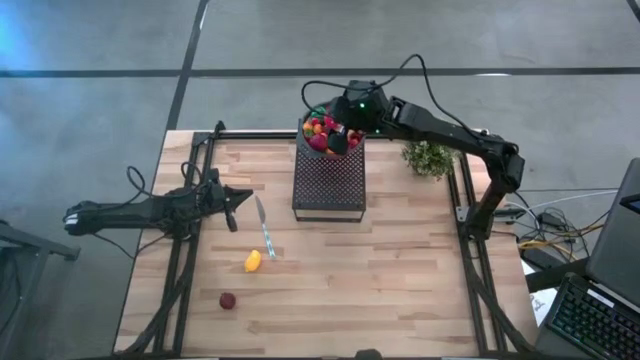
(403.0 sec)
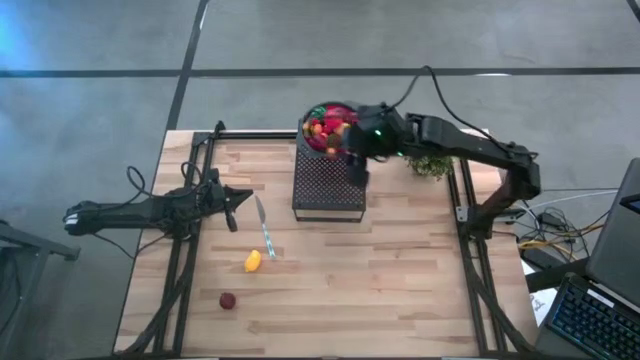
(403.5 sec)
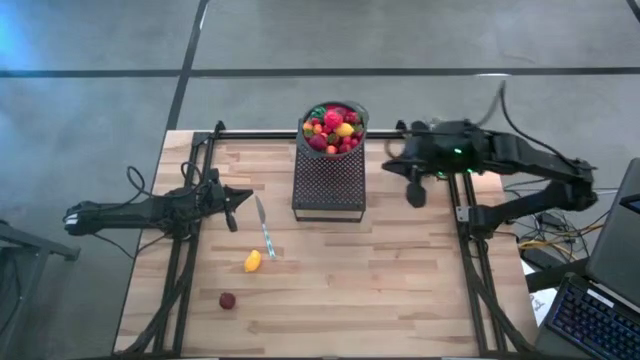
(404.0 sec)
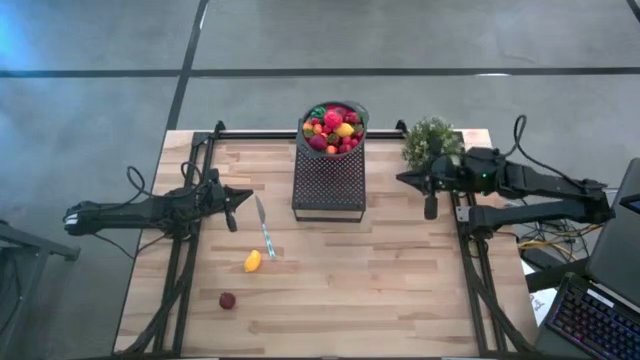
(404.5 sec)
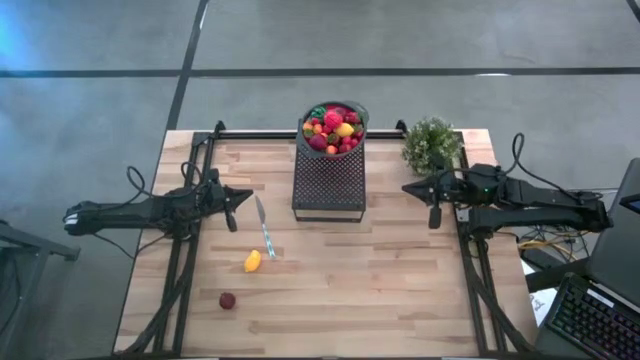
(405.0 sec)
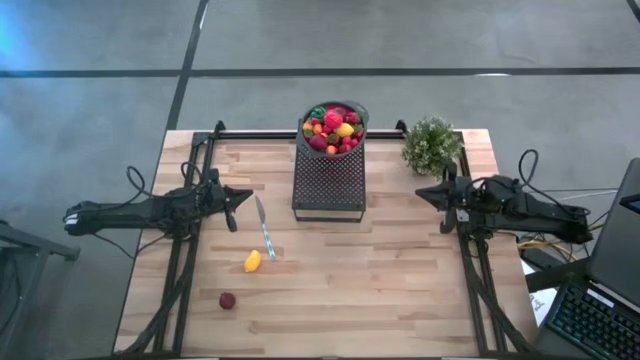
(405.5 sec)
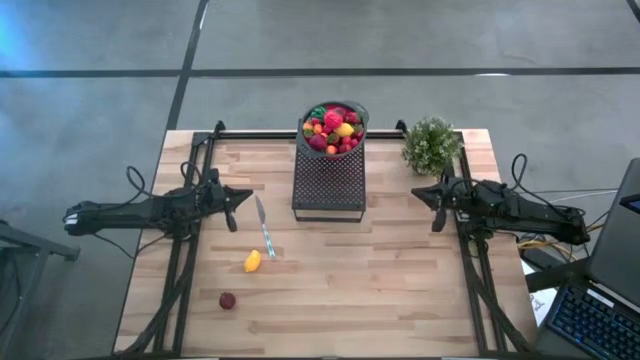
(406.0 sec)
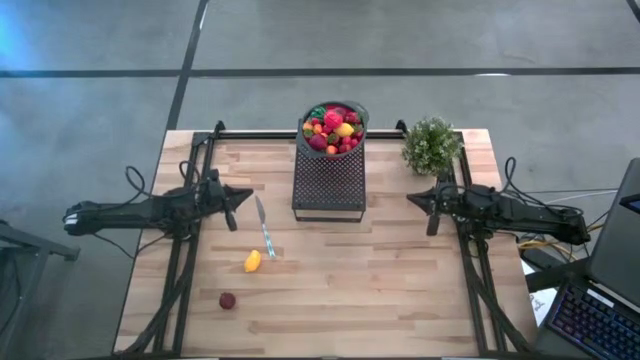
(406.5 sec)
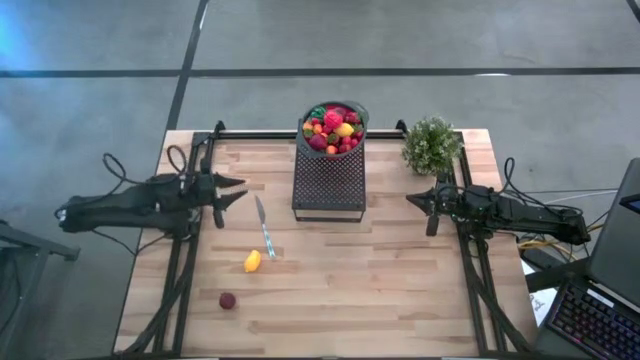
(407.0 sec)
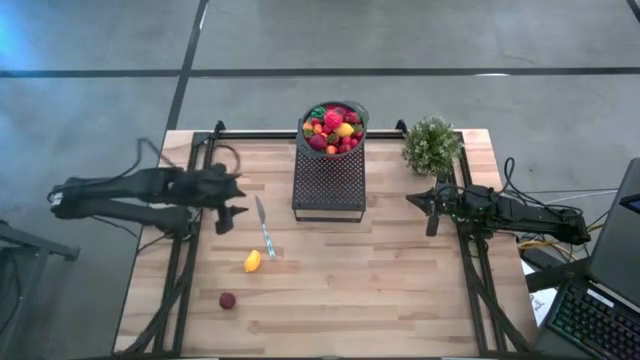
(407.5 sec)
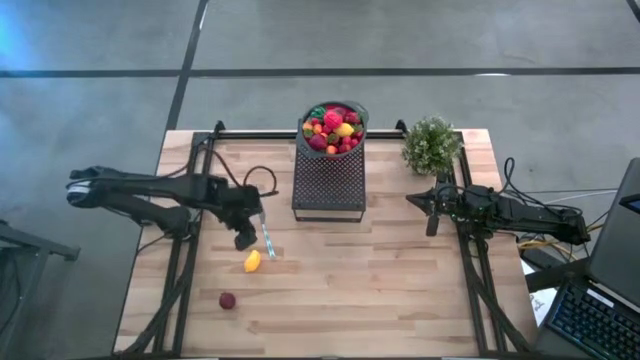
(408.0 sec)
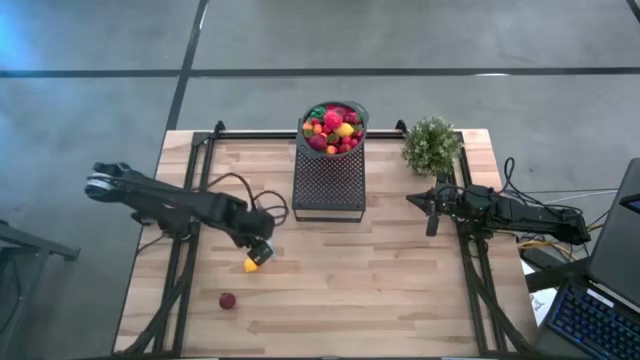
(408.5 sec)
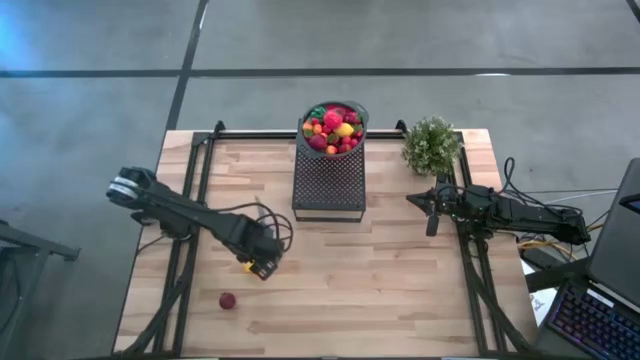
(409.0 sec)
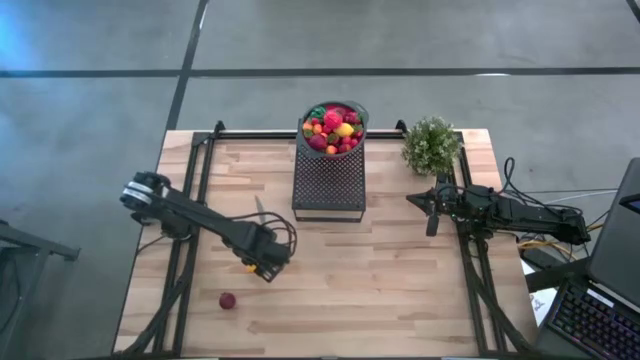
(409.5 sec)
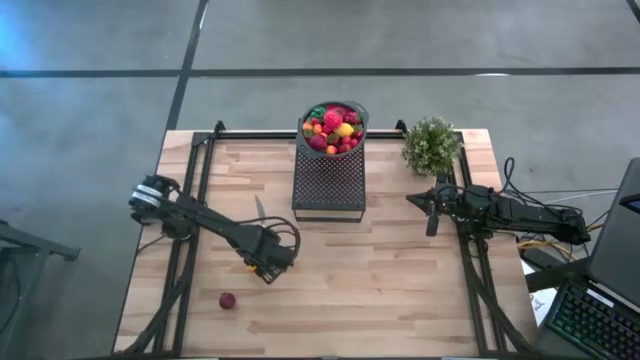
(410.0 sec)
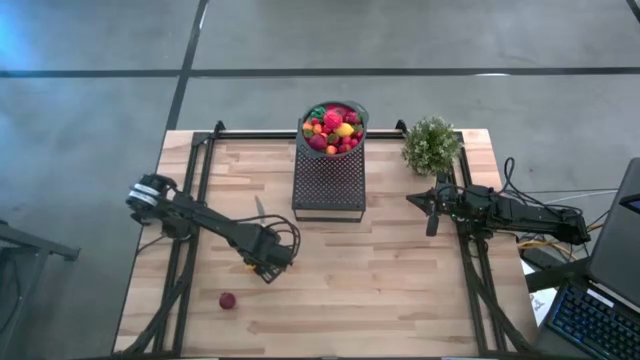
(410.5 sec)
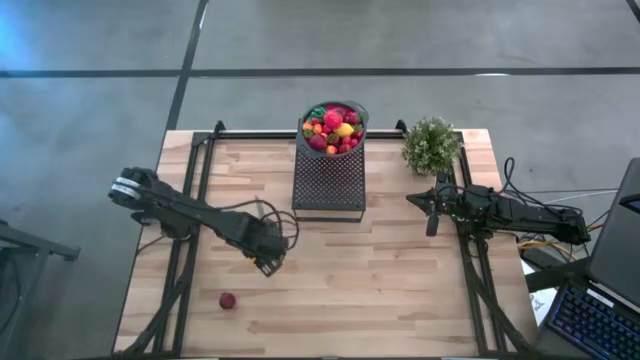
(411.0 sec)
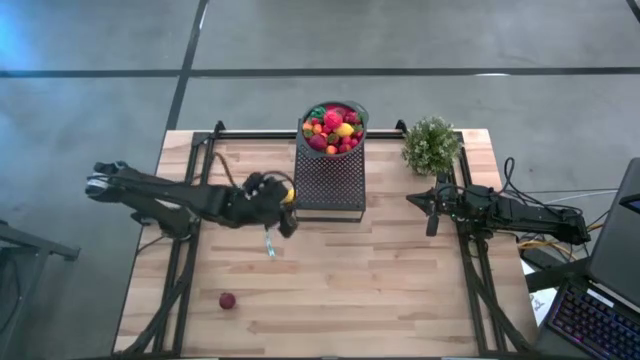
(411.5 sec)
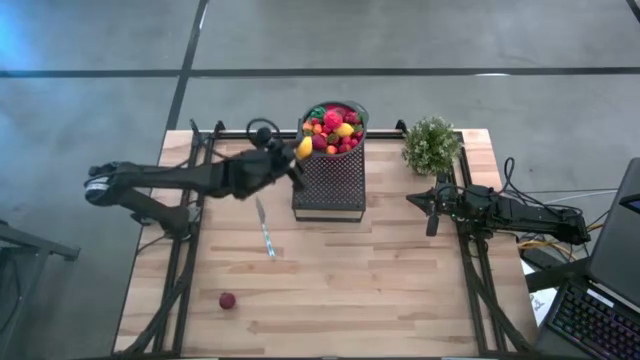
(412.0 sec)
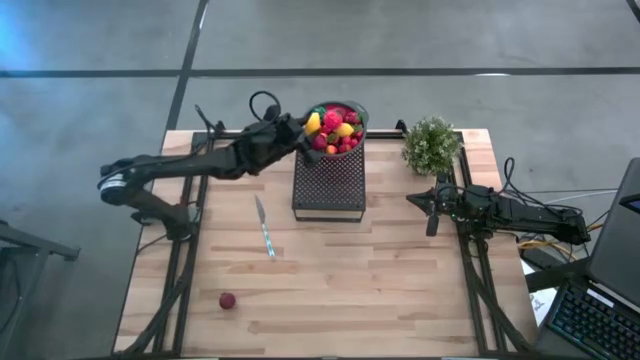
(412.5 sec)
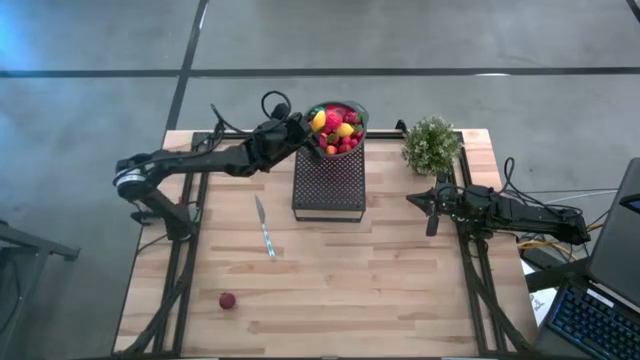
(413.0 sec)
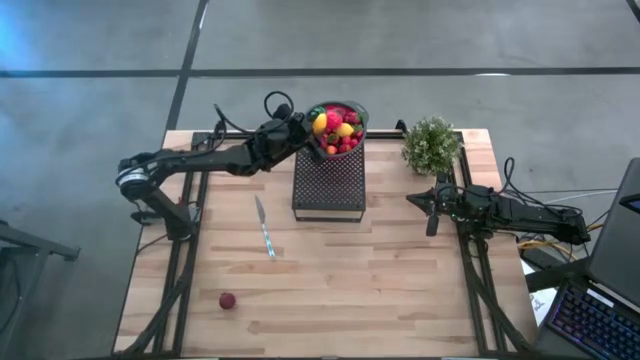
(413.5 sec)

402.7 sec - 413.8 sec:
Task: Pick & Place Fruit
Put the yellow mango into the strainer bowl on the shelf

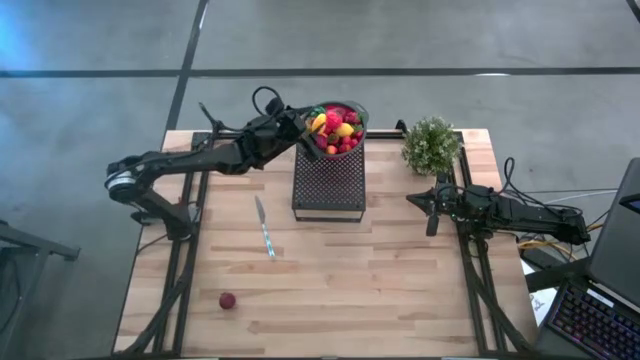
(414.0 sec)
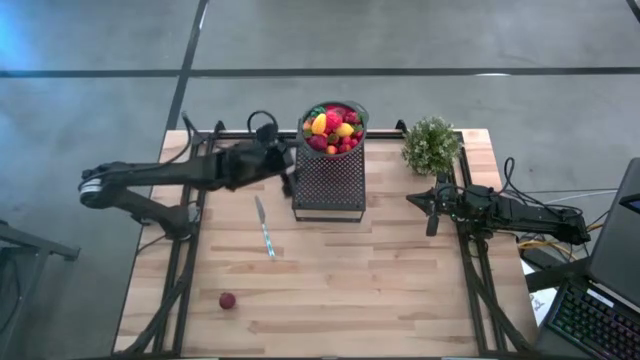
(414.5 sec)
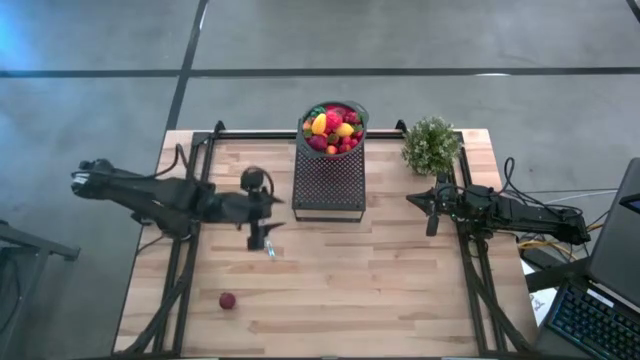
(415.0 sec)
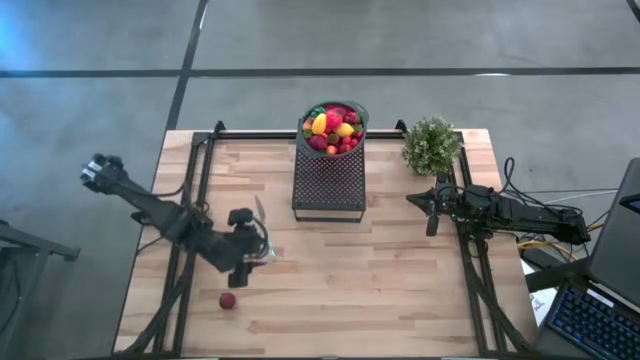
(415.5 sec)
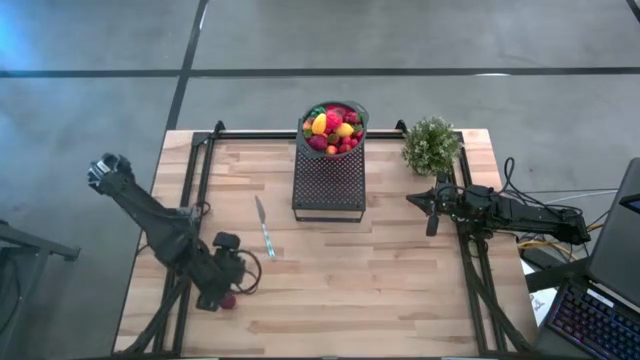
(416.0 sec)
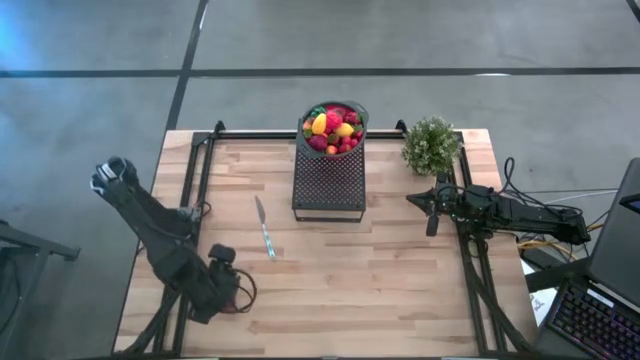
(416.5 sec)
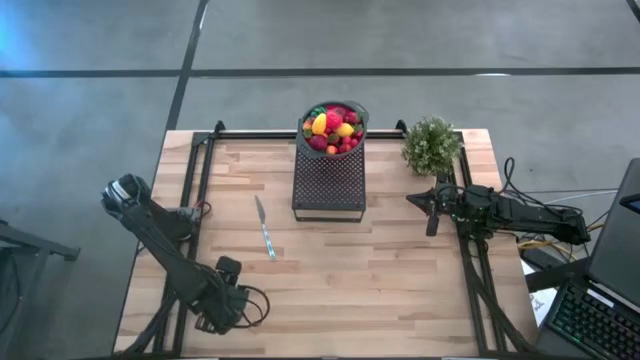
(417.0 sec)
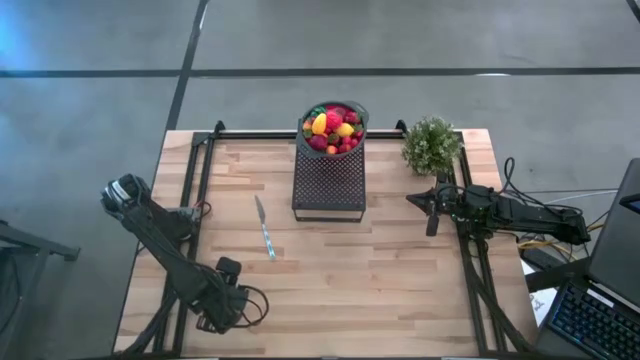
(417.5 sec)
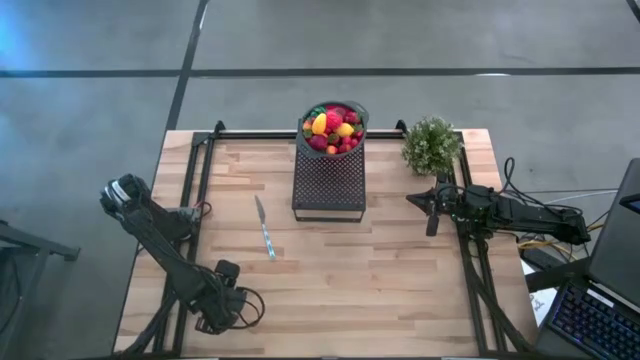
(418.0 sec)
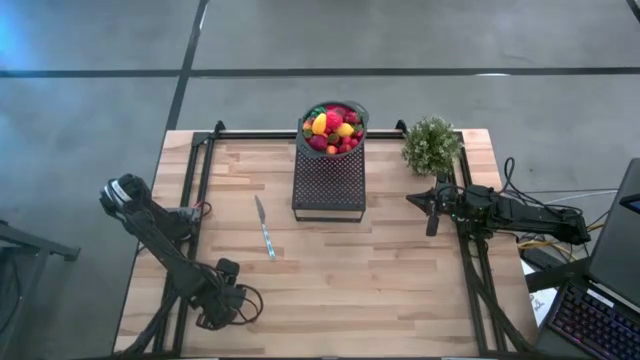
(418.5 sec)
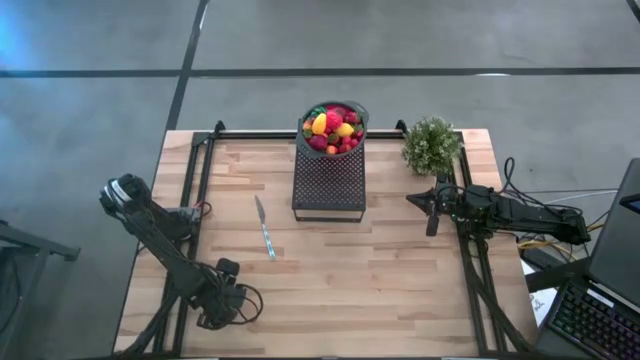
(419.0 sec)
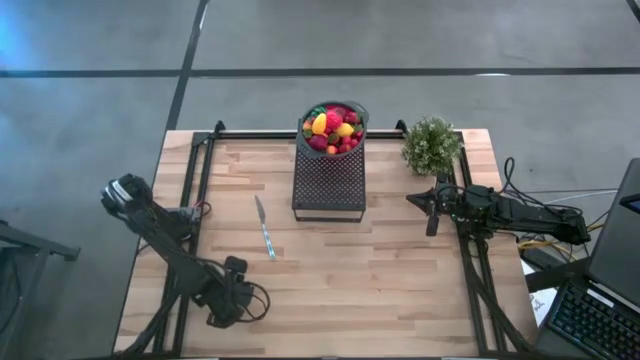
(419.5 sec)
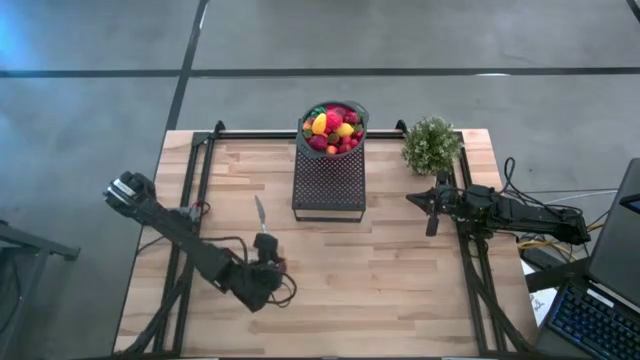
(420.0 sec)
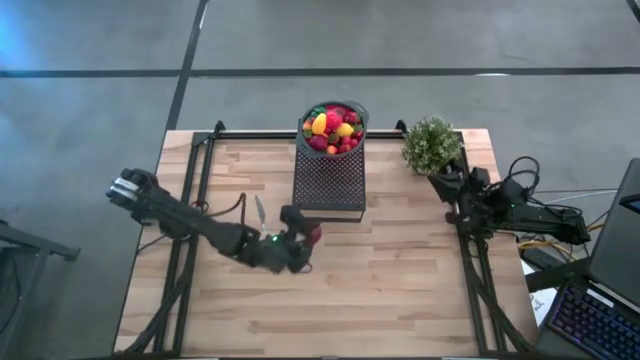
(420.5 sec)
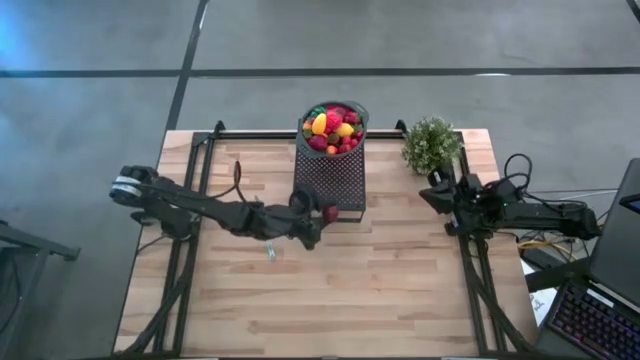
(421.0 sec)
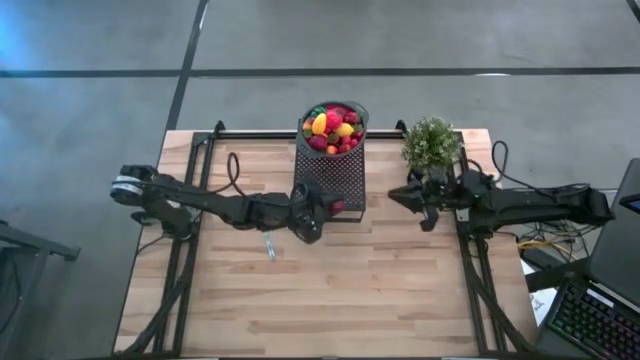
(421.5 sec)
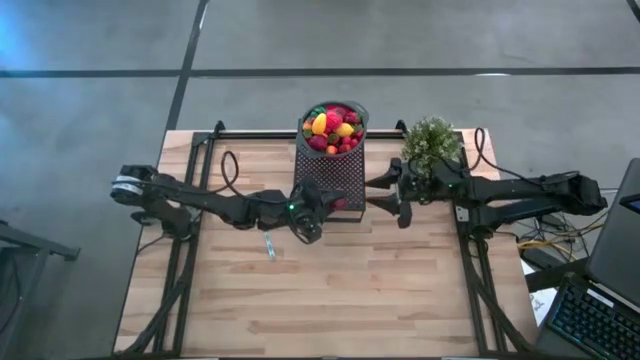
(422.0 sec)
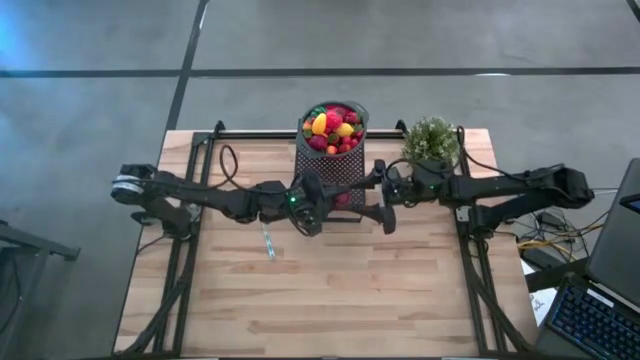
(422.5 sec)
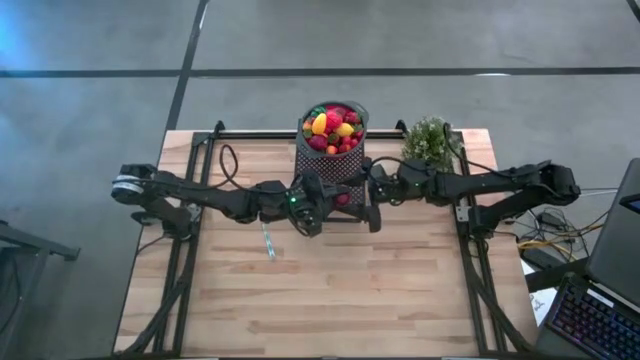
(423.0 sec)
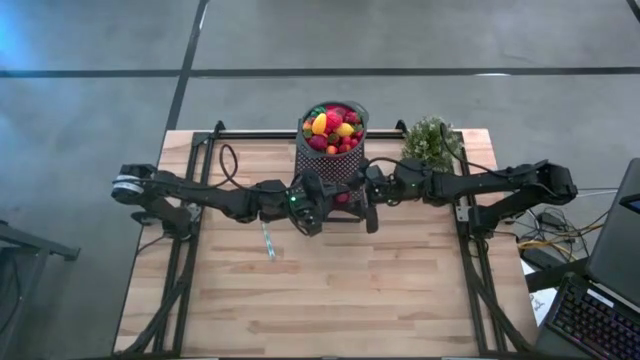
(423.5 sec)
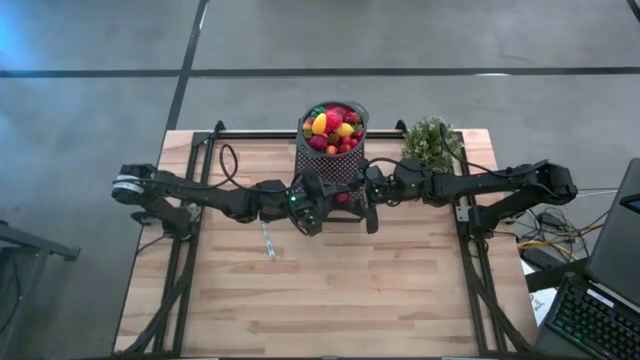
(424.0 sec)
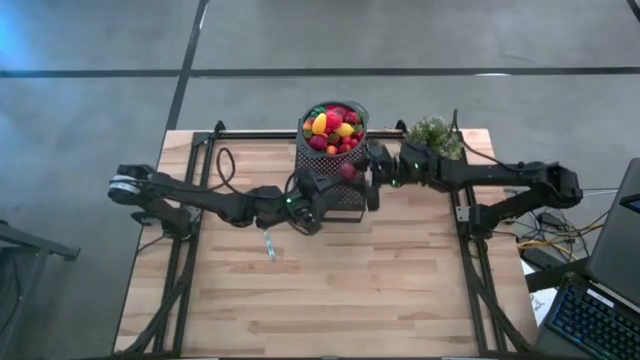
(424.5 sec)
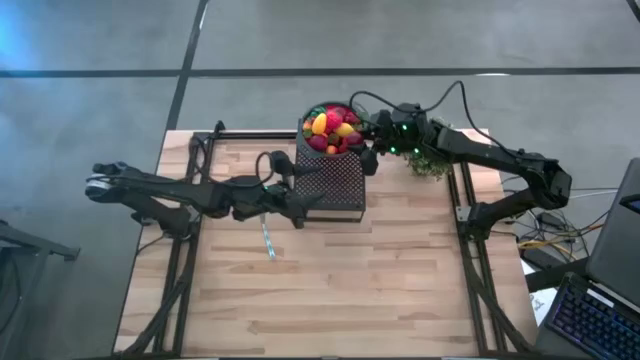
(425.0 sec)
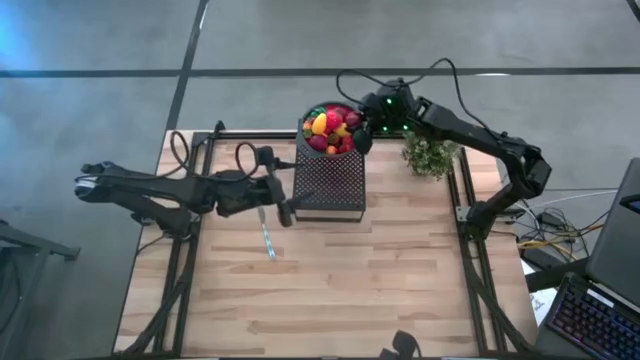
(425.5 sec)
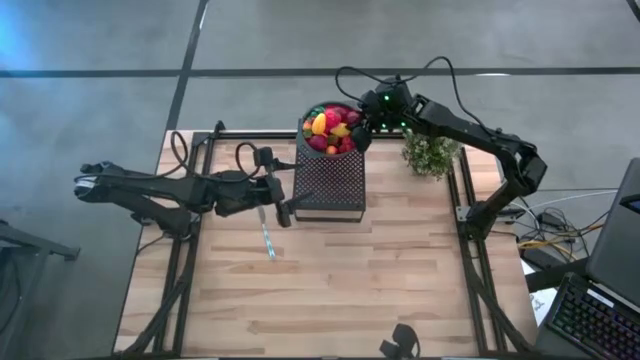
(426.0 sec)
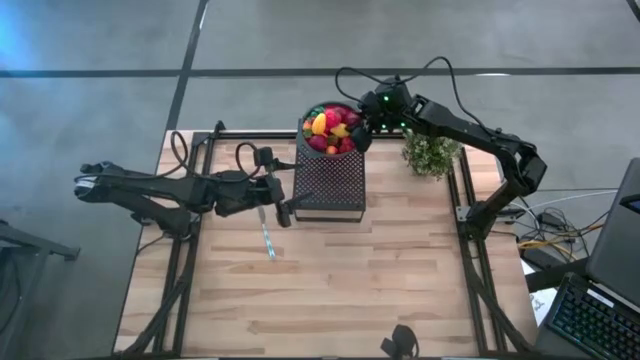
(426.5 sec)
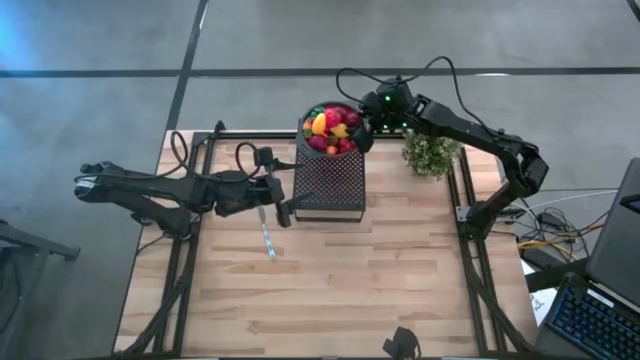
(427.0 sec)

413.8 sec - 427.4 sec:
Put the pomegranate into the strainer bowl on the shelf
